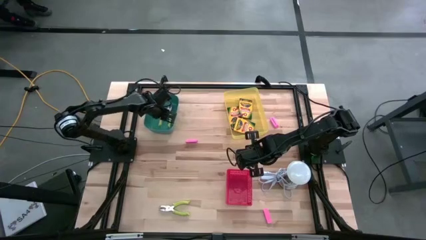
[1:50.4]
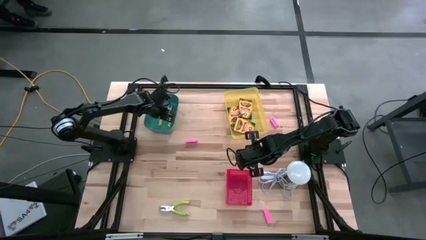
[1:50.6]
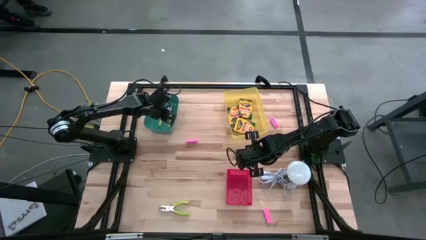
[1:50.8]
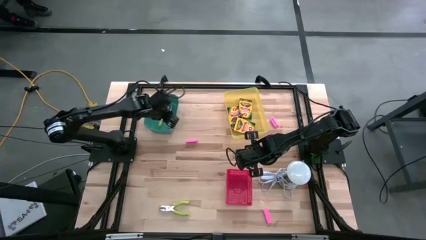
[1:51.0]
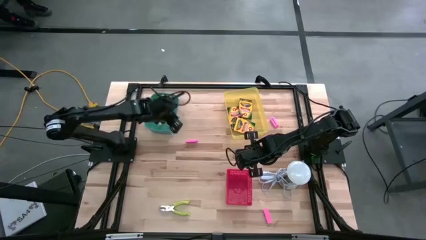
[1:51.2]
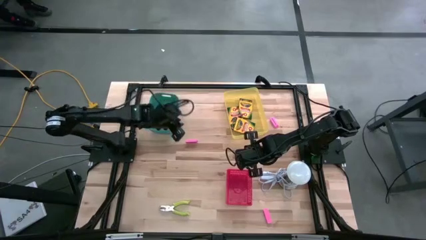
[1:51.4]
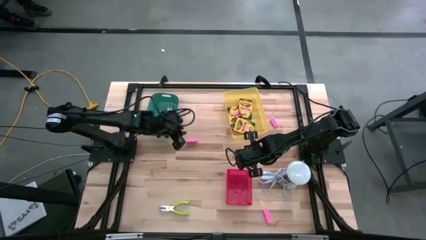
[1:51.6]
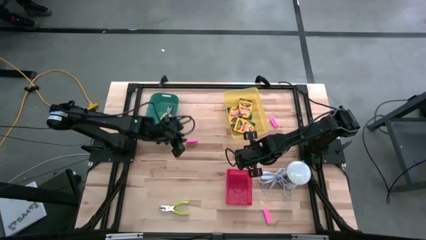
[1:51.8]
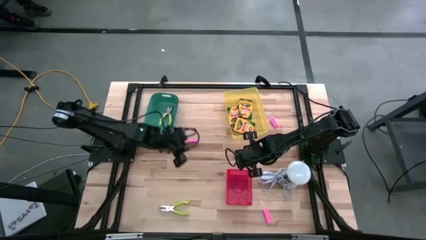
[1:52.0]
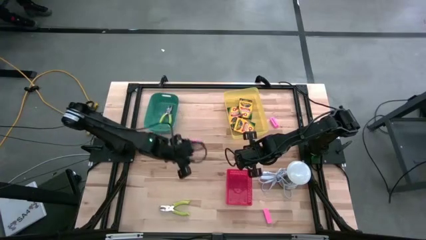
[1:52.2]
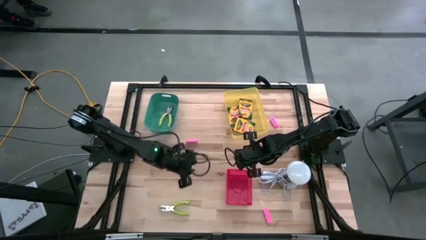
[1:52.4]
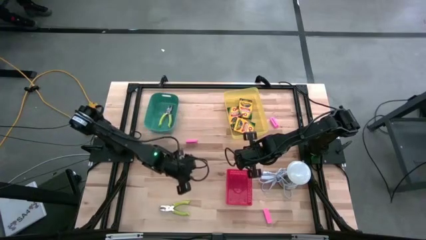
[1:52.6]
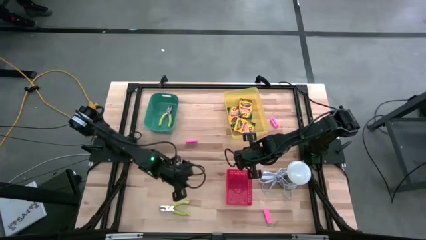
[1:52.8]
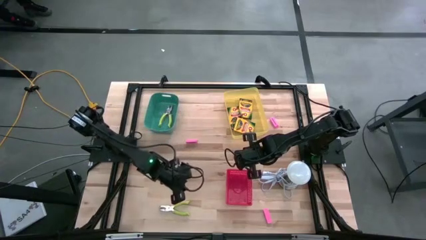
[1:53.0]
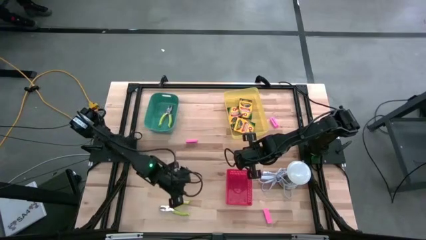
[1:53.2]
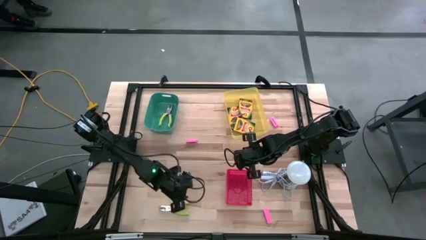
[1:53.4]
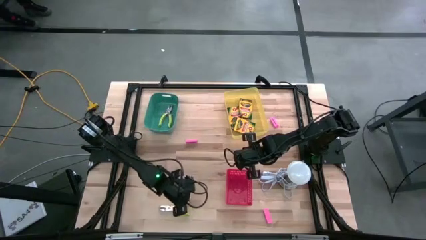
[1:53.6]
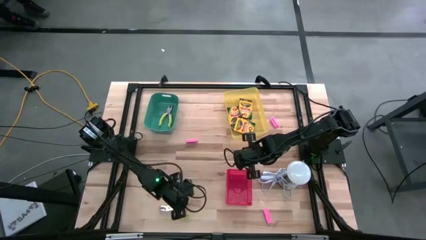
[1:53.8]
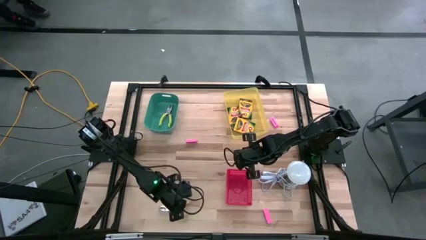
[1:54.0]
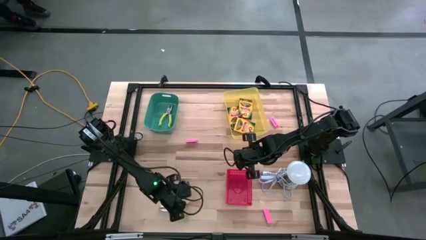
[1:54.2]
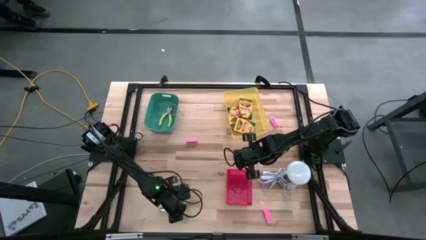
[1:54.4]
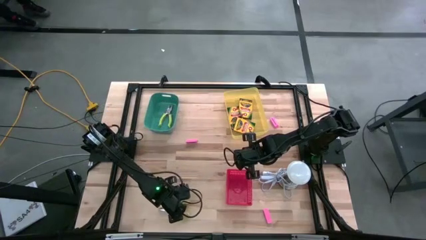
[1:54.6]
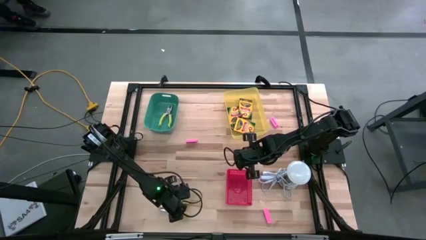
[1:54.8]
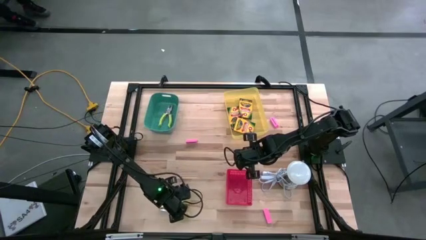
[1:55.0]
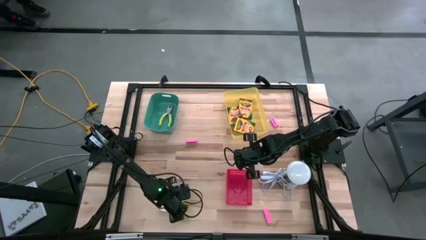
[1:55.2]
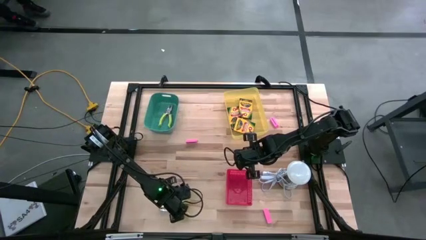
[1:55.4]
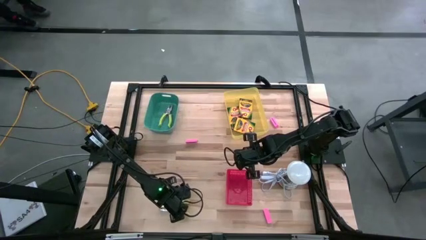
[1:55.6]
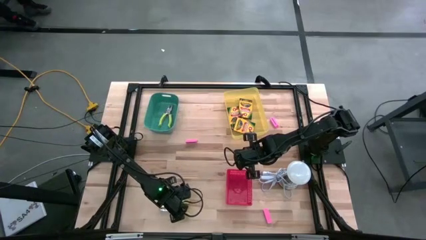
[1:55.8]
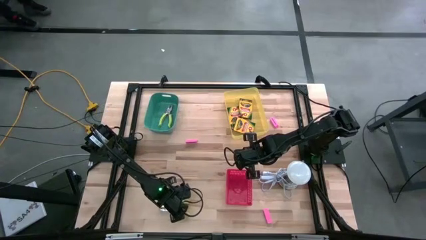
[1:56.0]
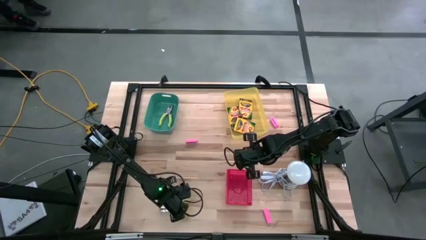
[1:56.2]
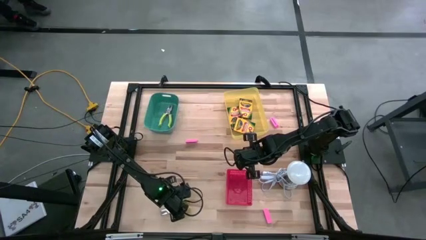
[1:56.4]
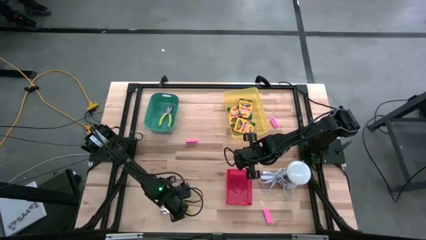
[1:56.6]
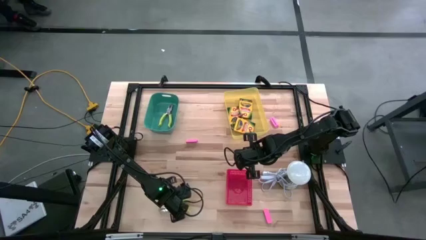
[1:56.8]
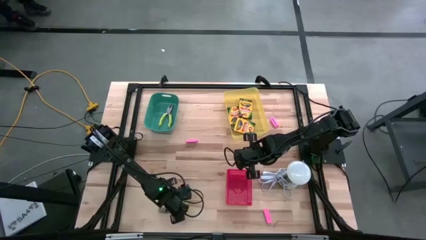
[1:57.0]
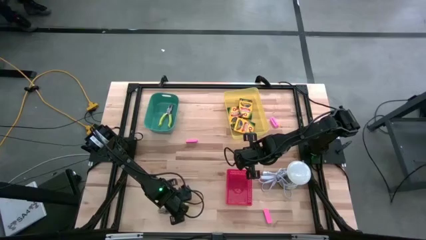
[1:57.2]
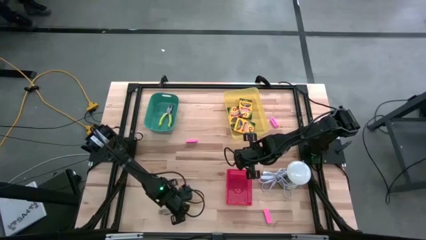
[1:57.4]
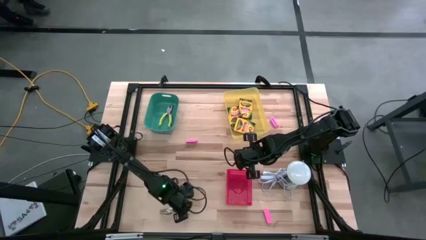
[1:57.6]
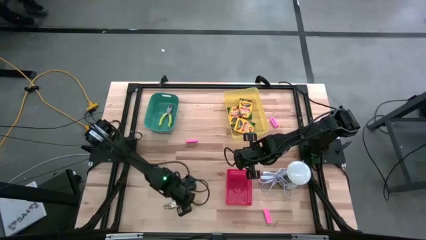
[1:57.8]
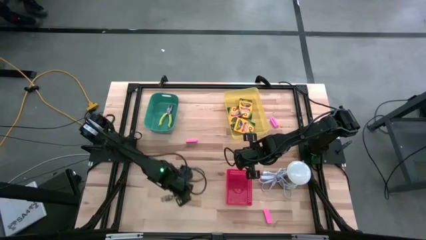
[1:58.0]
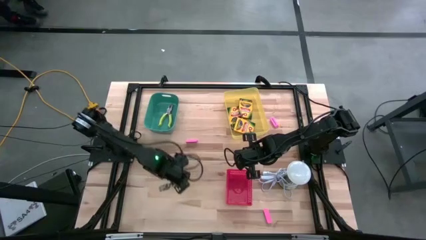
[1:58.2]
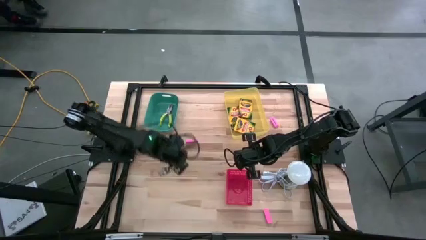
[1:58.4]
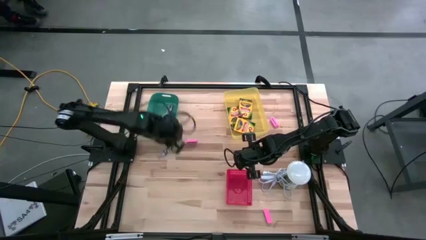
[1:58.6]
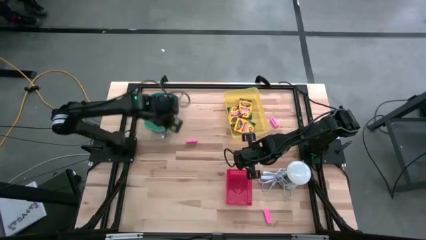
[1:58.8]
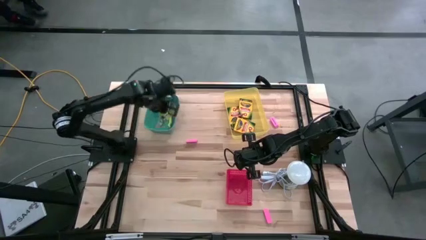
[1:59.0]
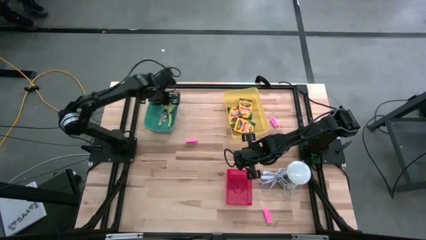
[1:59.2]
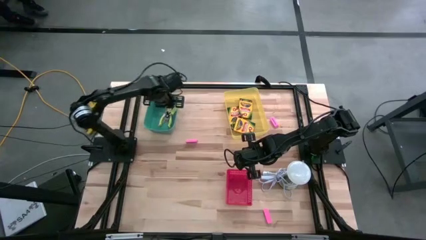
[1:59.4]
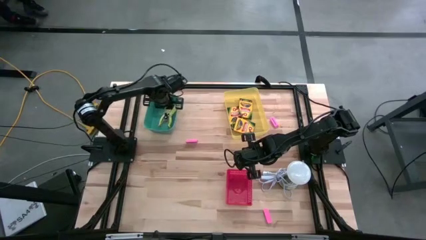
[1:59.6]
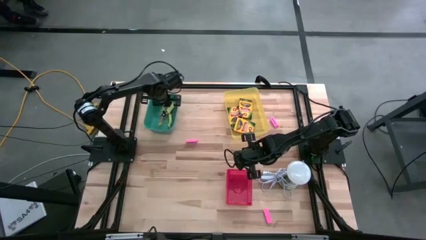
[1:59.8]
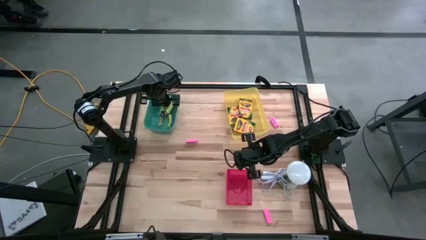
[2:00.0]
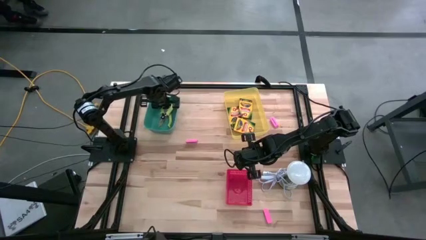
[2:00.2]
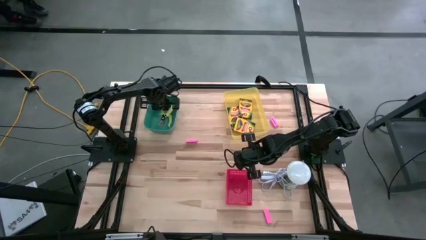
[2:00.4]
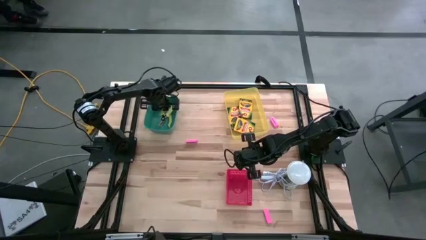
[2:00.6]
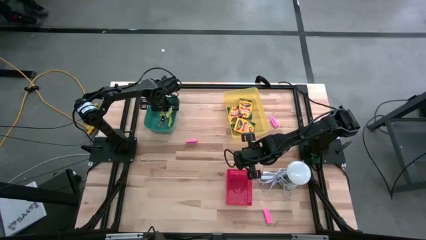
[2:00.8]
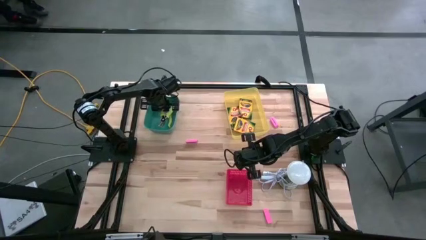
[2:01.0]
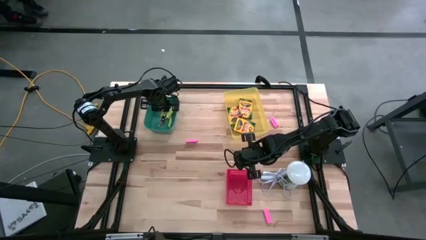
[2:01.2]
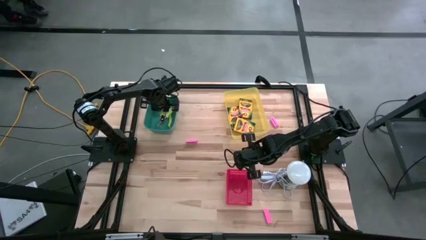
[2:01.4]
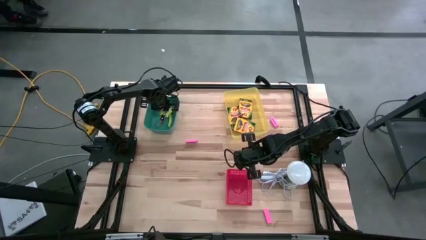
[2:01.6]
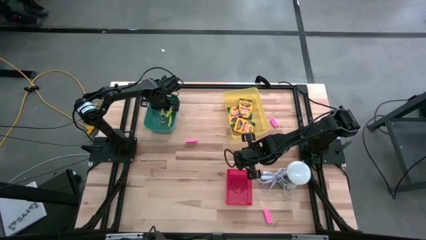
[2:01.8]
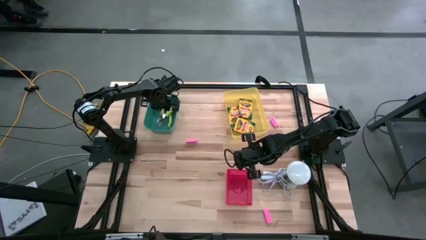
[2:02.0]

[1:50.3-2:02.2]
Task: Pick & Place School Supplies
Put the puncher hole into the green bin
